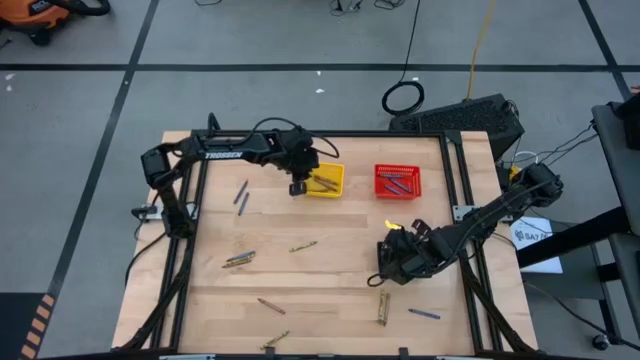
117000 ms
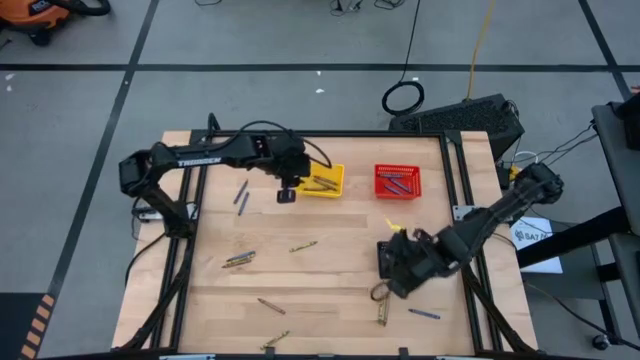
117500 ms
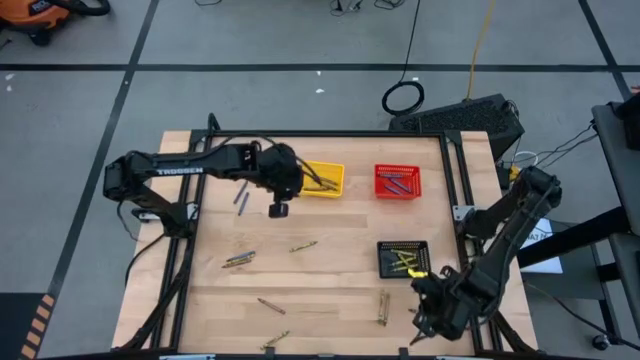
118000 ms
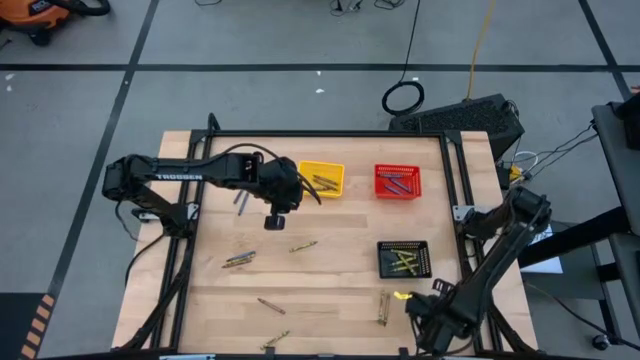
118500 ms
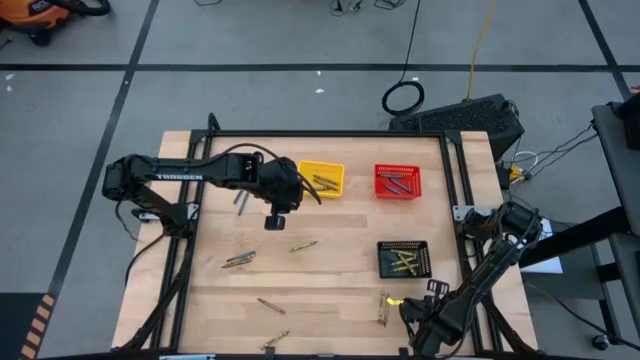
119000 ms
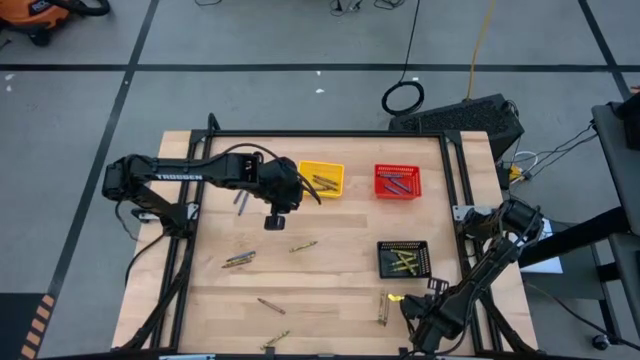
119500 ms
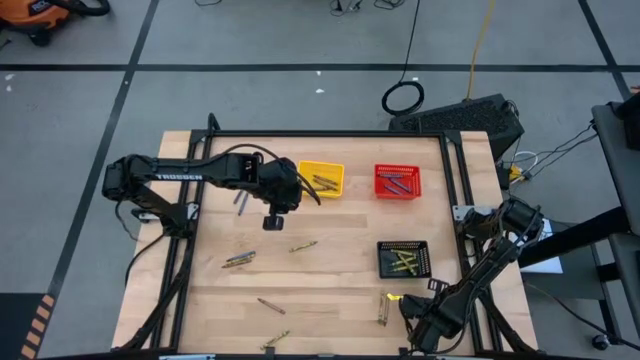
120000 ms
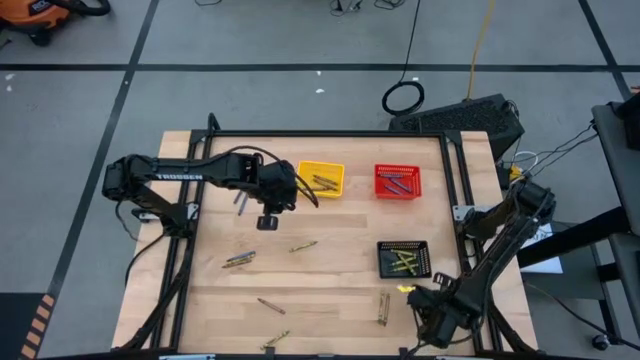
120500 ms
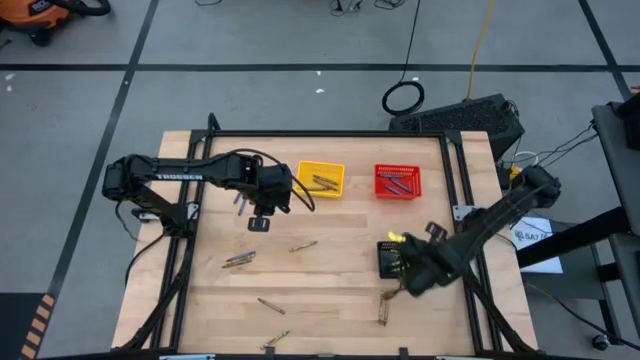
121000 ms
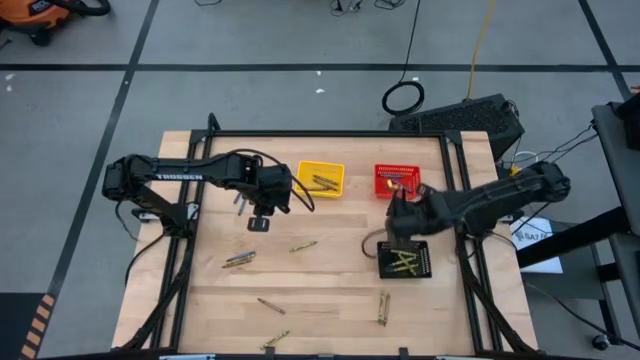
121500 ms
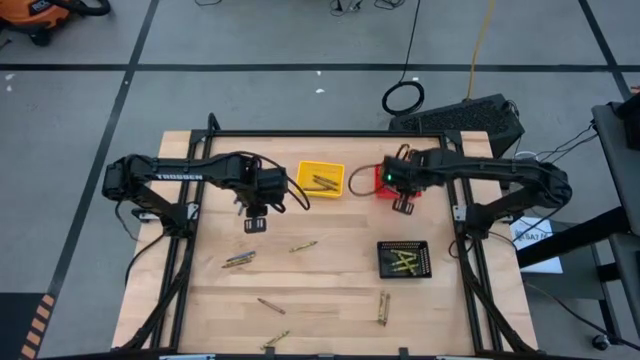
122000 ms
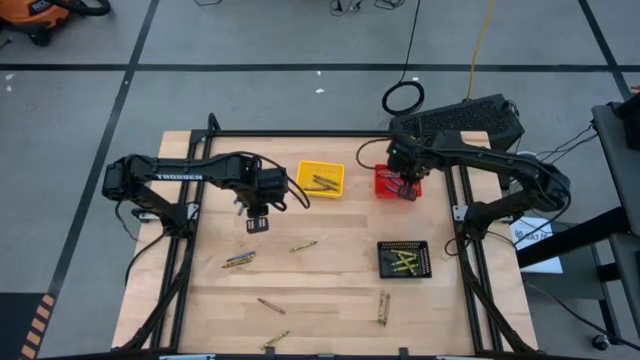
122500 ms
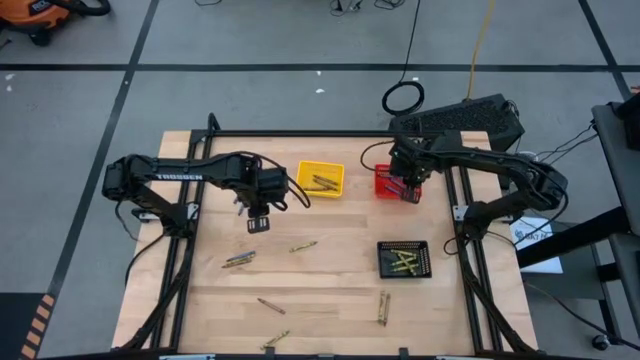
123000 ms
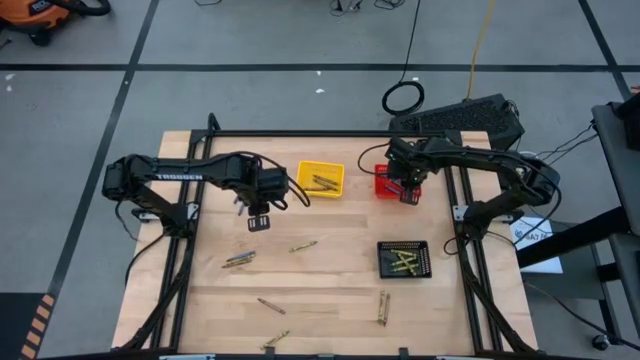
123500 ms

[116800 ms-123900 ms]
Task: Sort crayons
Put the blue crayon into the red bin

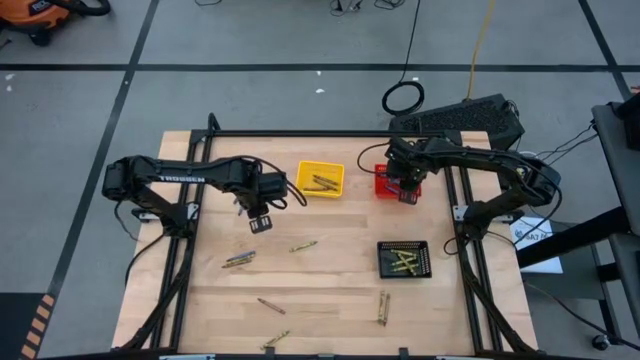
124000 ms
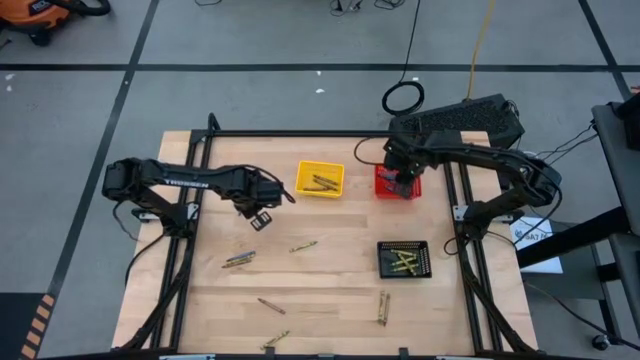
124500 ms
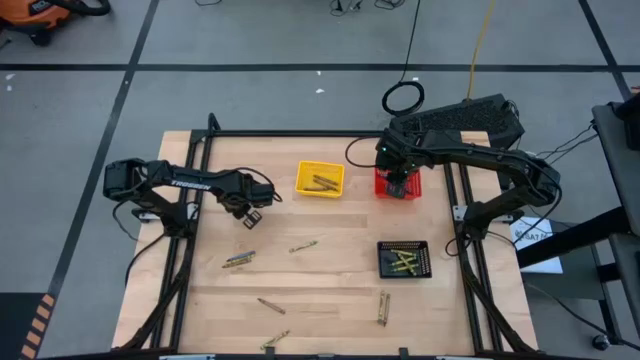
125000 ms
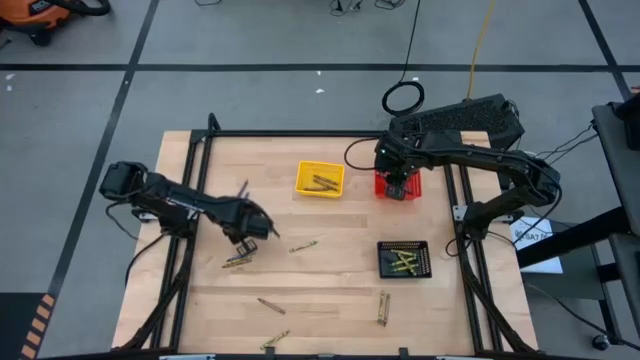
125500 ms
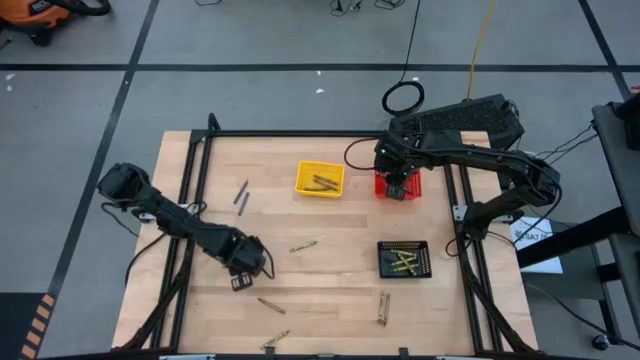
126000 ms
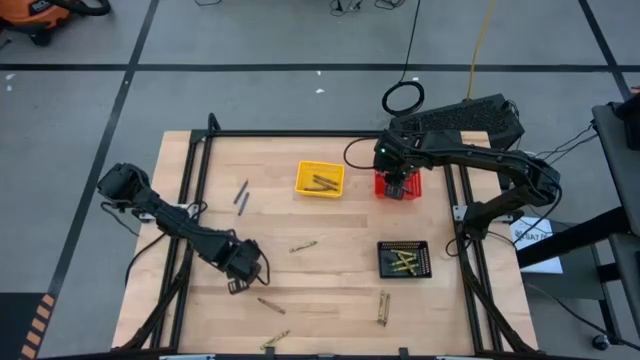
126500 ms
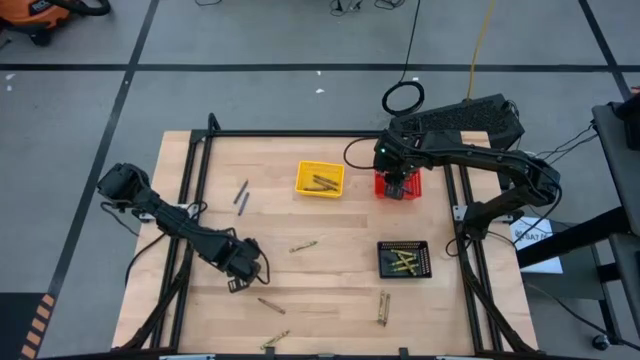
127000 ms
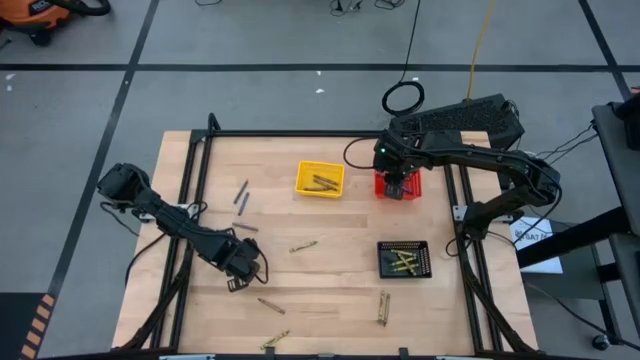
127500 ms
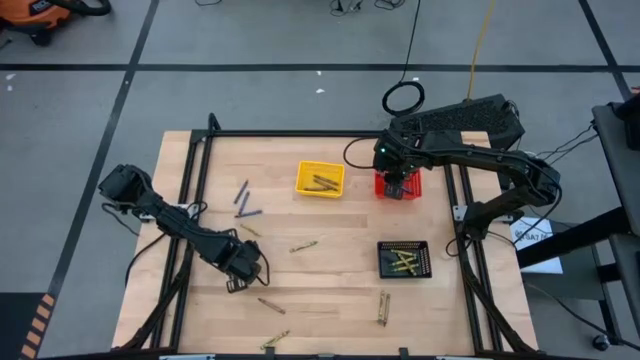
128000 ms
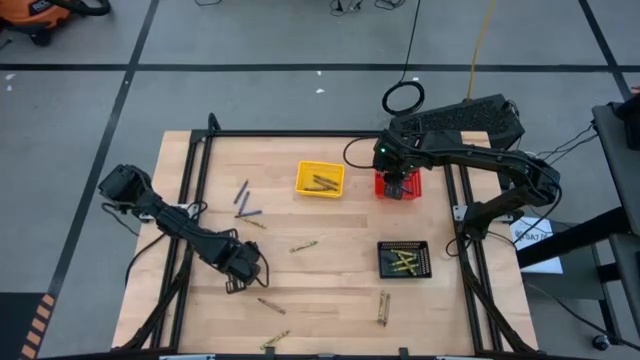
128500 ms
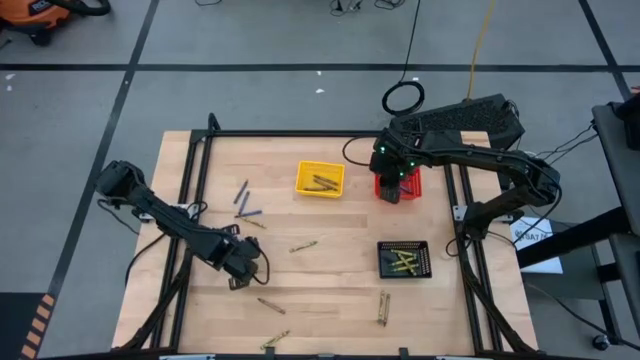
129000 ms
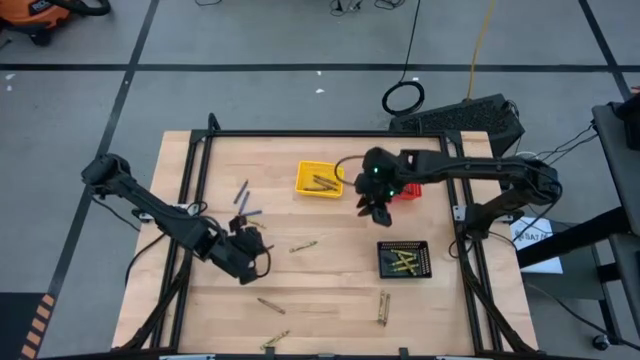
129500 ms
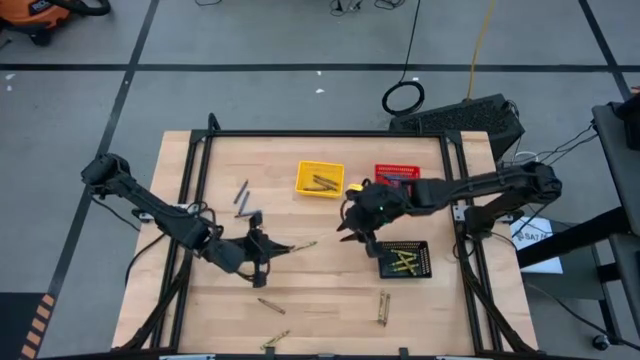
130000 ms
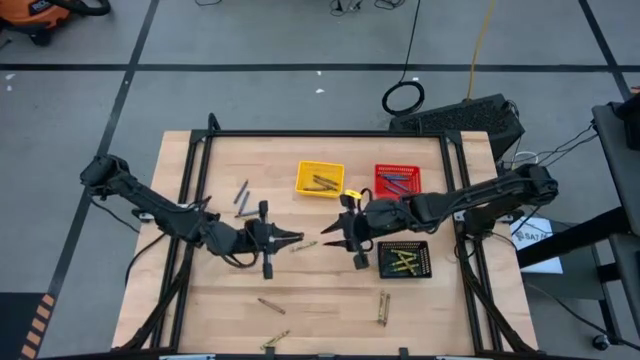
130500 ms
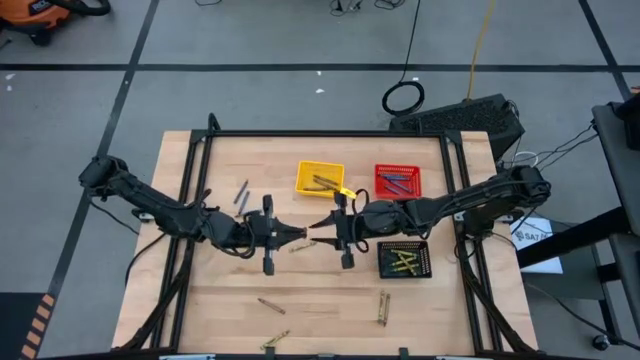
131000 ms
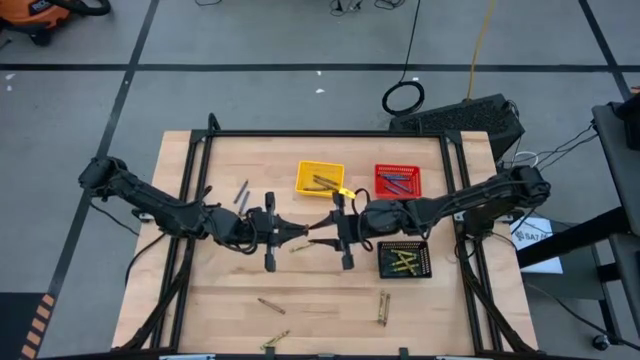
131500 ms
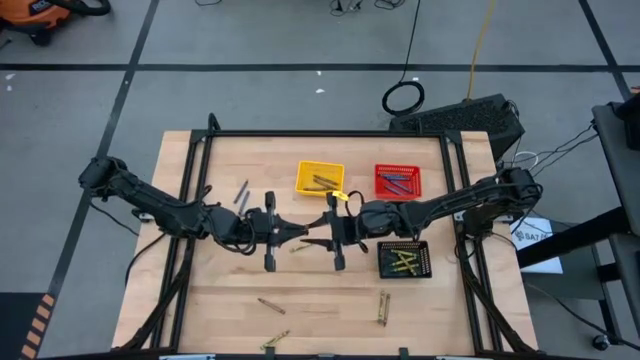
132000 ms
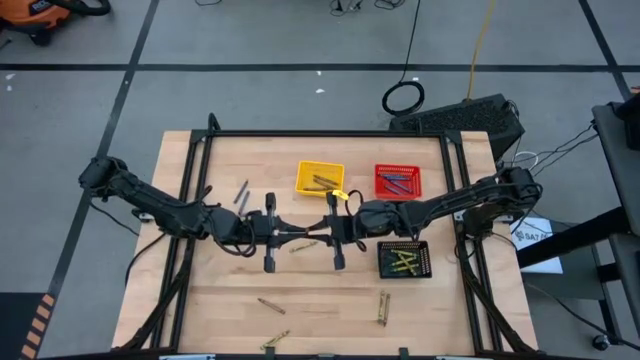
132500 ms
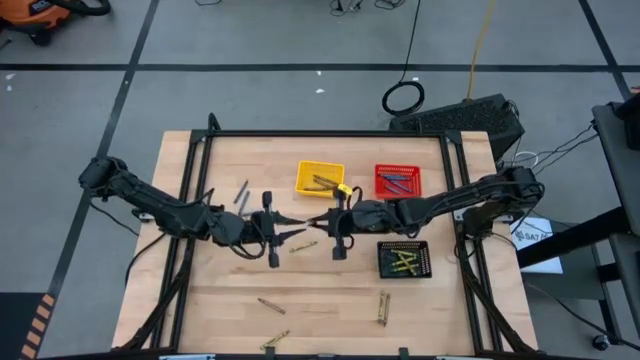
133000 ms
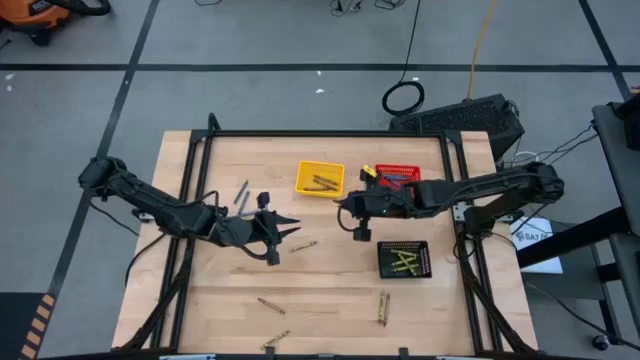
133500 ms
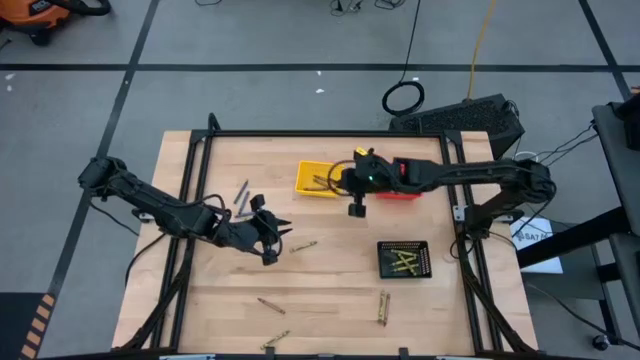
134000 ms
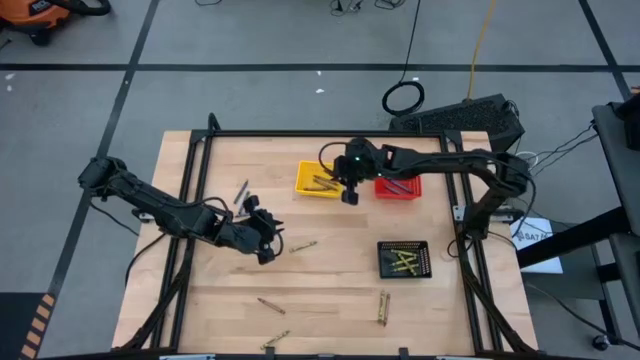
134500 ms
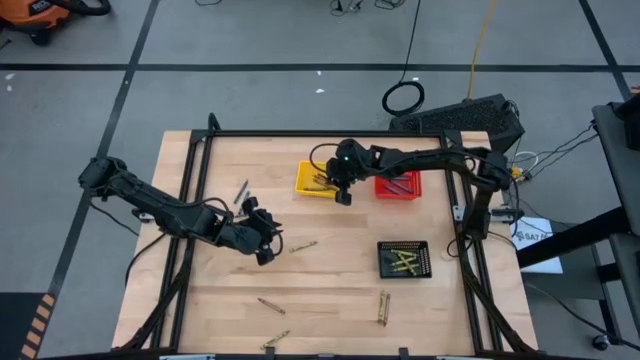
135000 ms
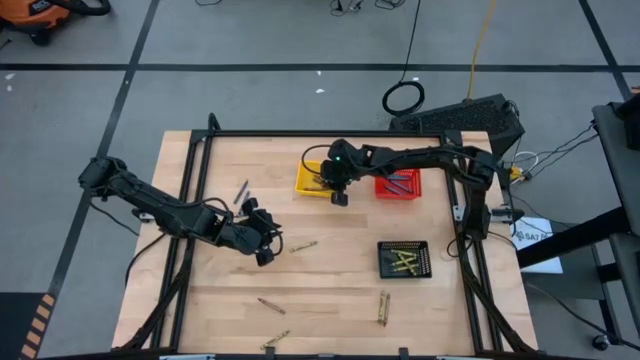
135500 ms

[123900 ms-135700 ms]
Put the brown crayon into the yellow bin

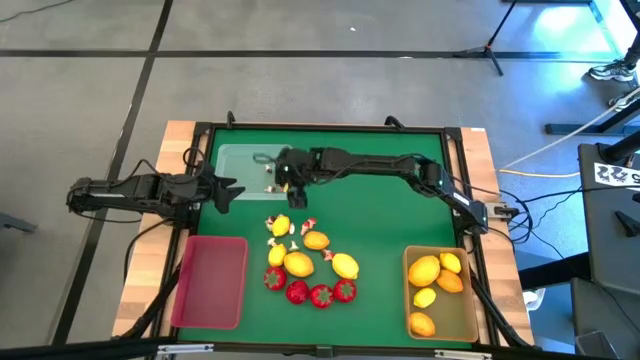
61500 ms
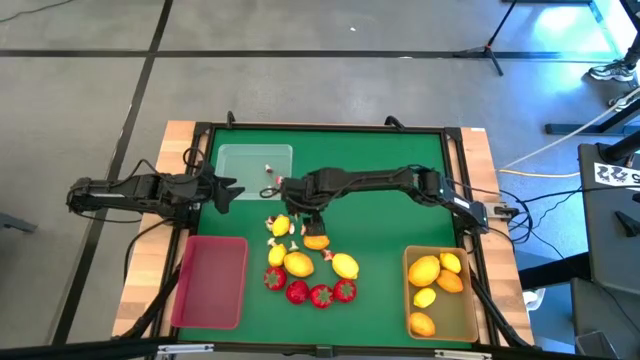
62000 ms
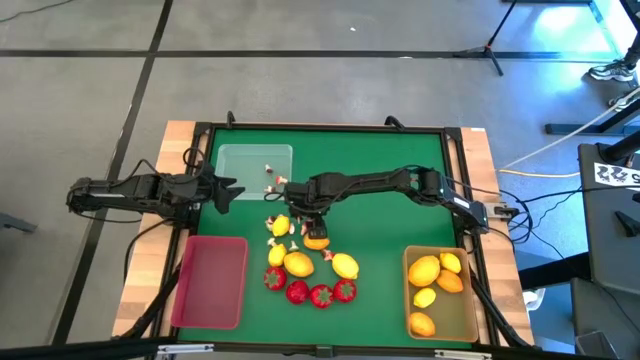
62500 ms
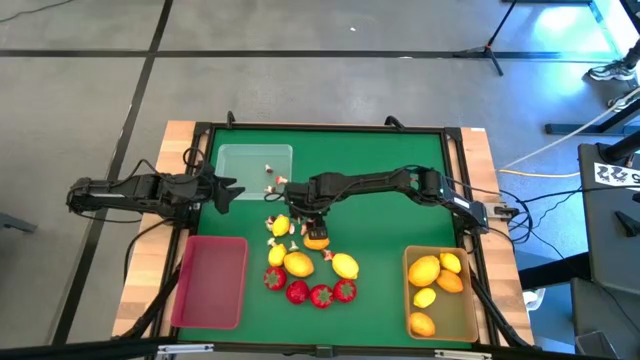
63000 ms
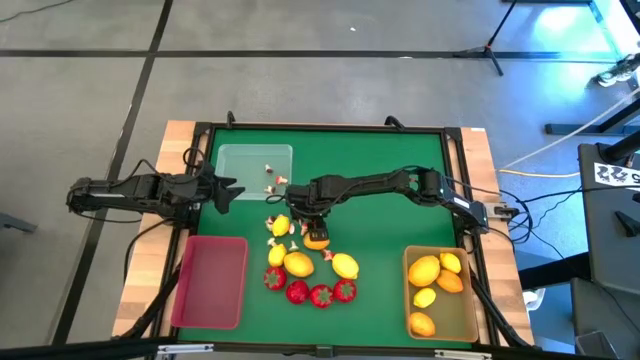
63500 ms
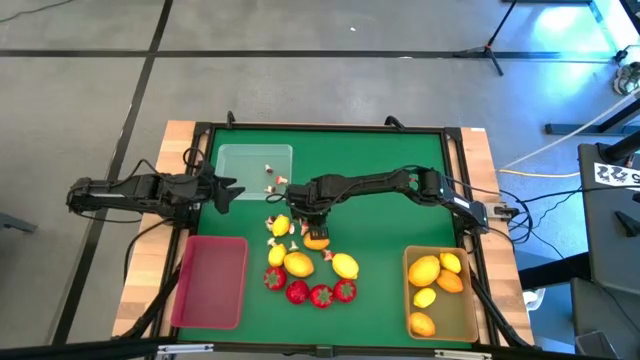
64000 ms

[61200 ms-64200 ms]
Task: Sort produce into baskets
Put the red mushroom into the transparent bin
